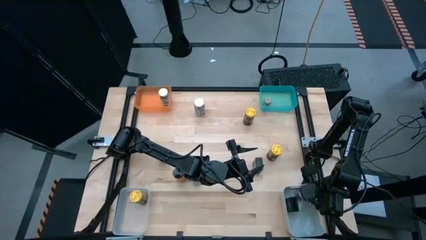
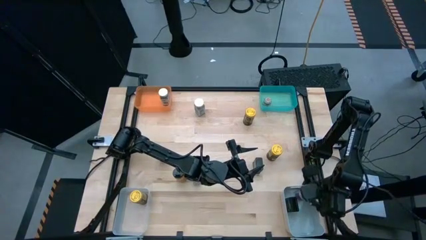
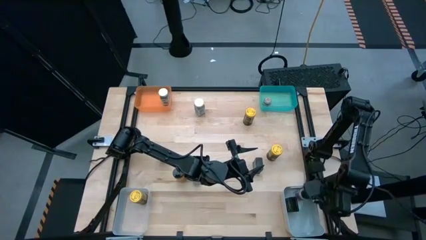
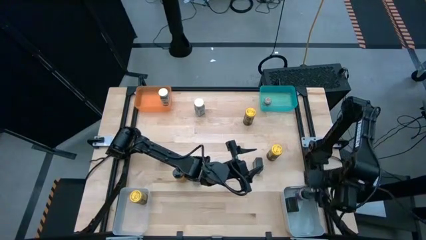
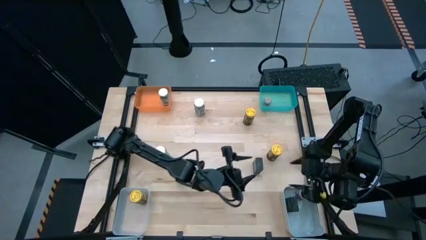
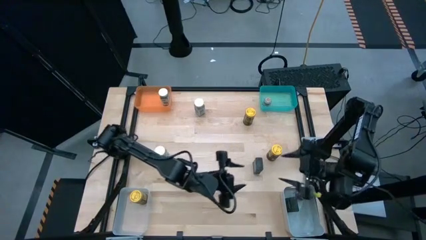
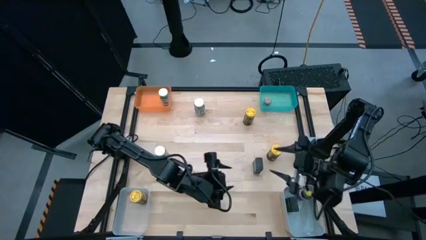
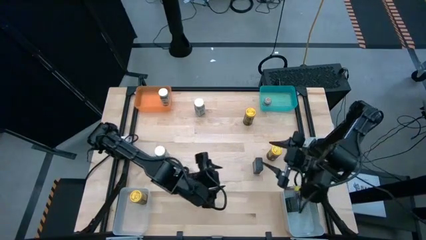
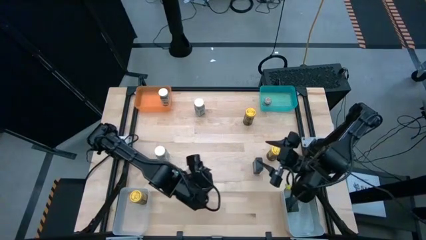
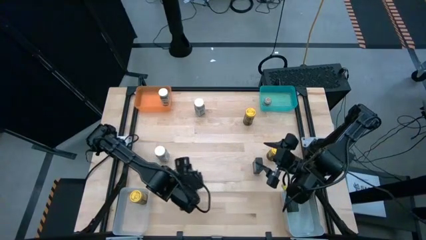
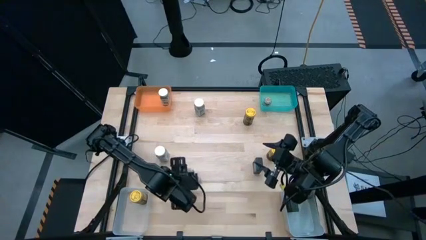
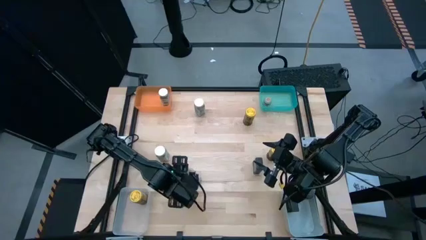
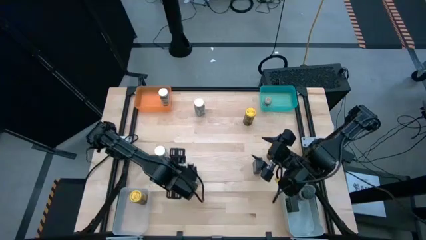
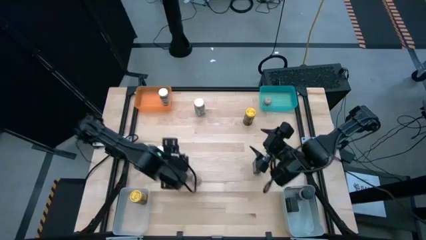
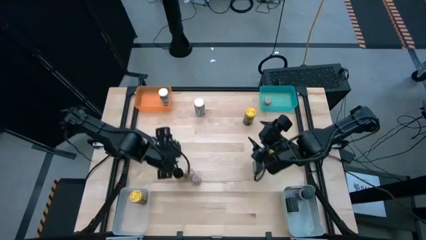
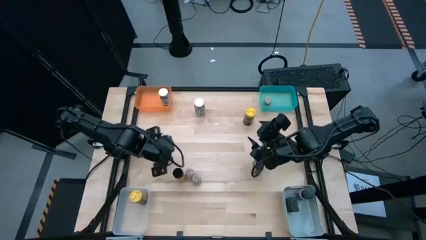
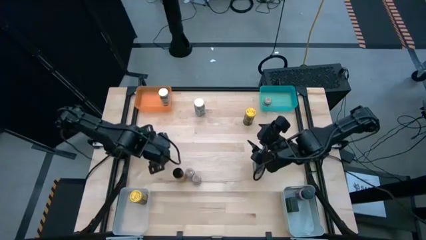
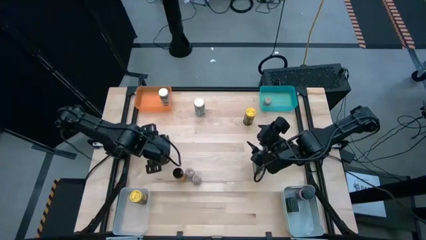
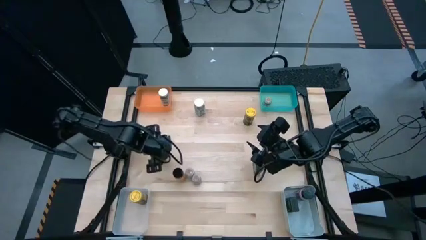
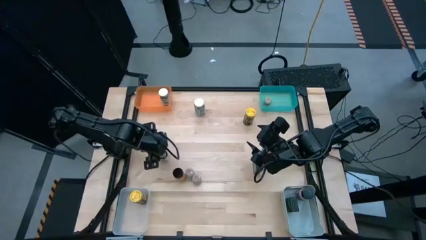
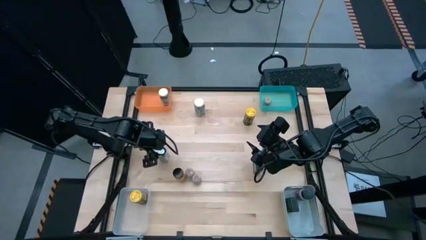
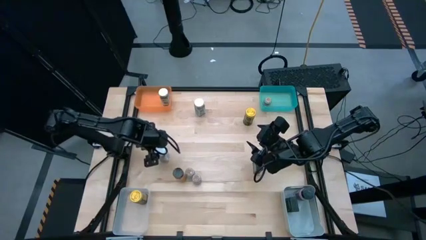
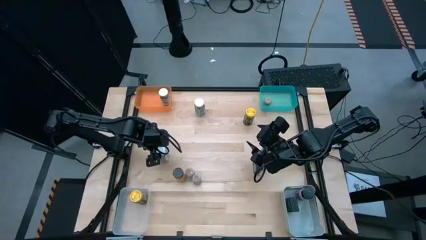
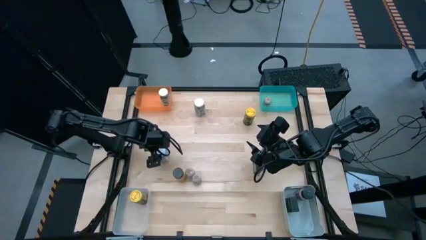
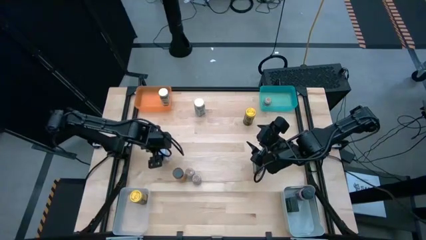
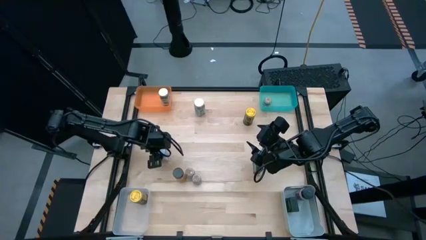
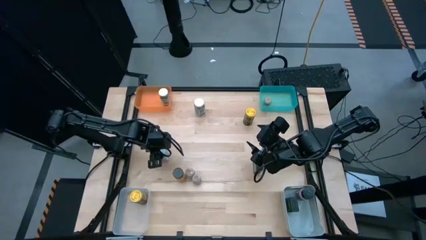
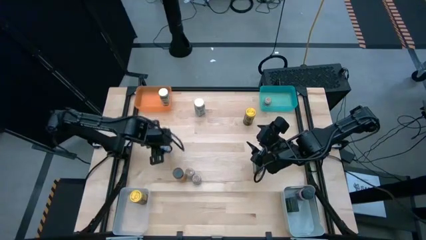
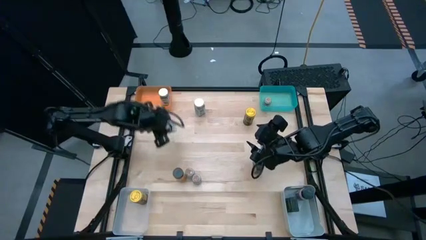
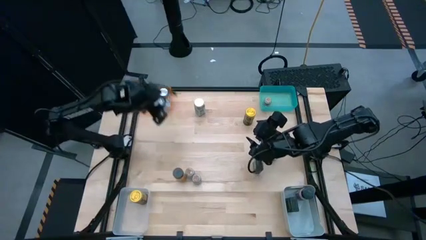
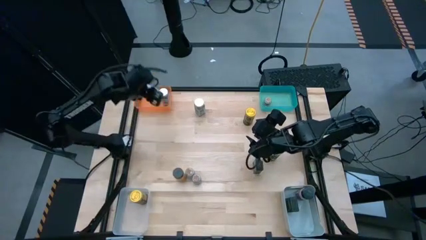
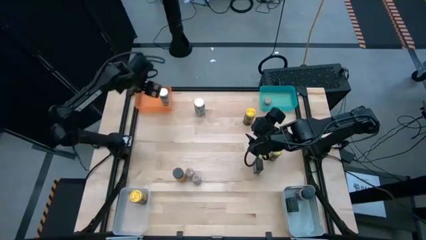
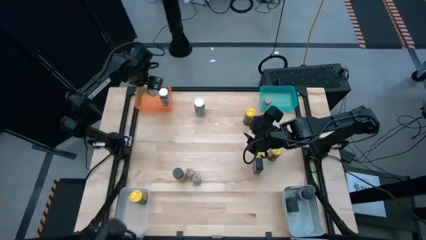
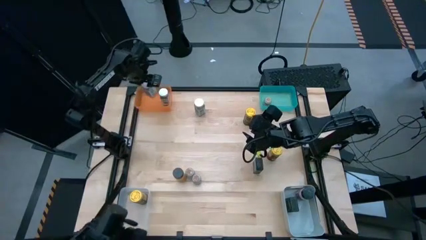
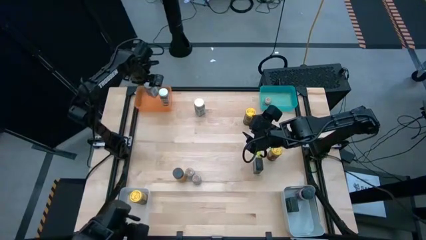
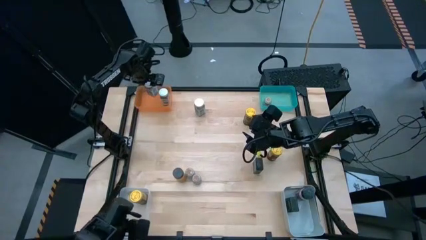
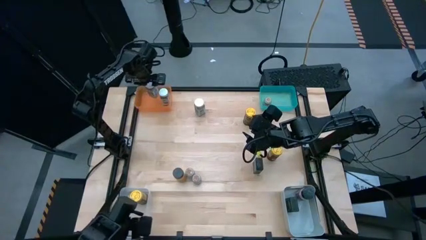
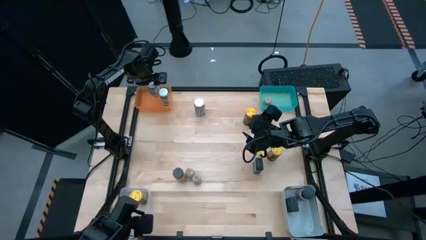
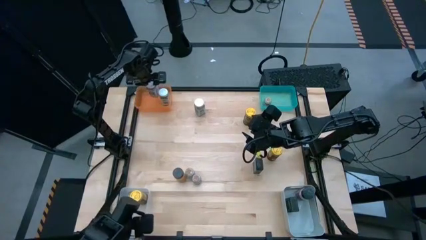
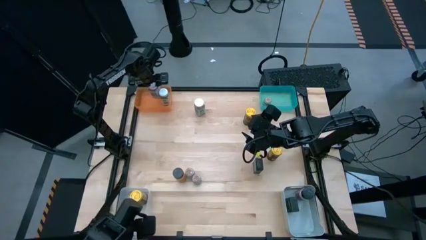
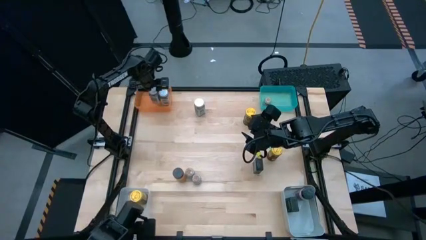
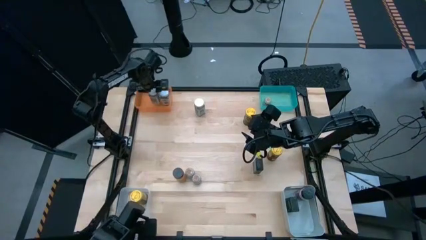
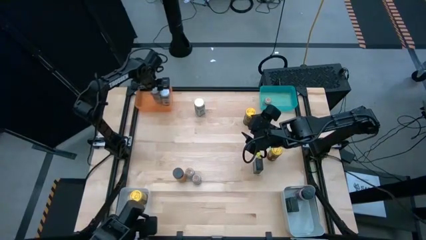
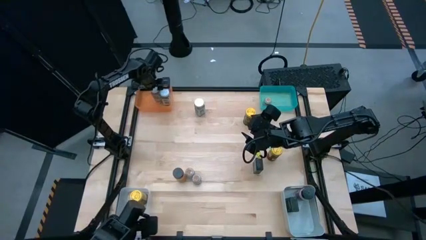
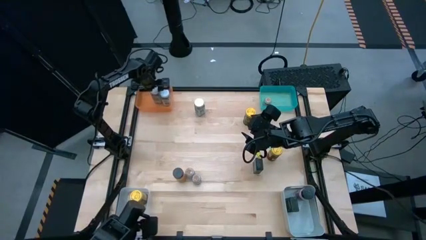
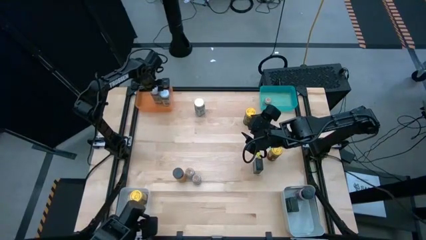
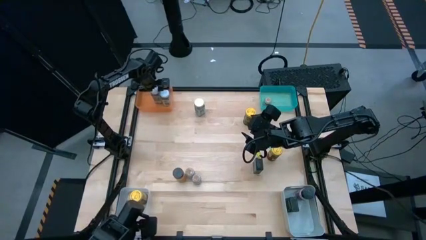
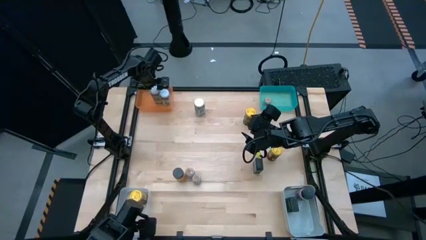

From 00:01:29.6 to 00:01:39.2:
Task: Sort spices by type
Put the bottom white seasoning bottle into the orange bin

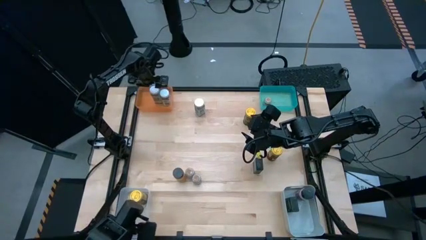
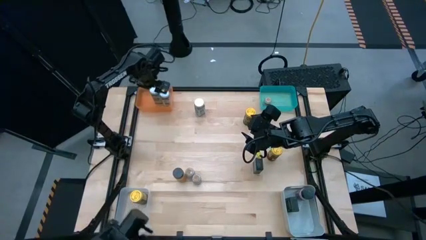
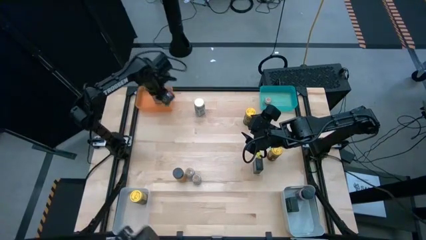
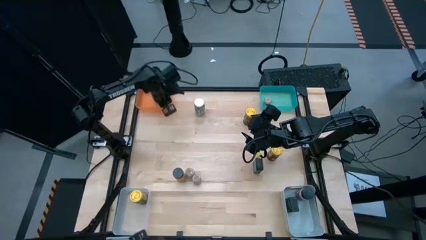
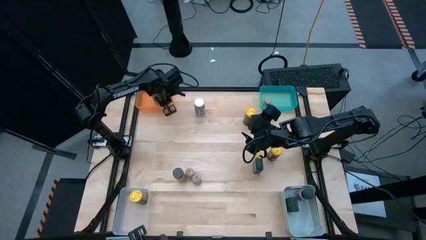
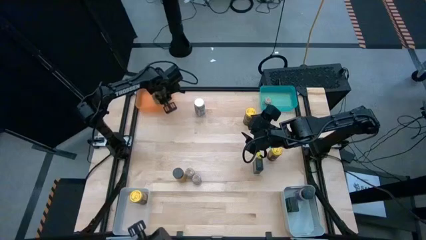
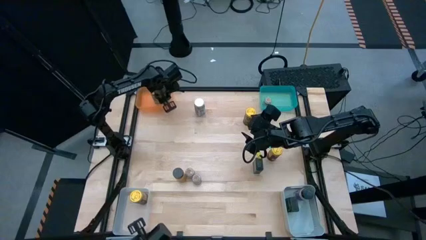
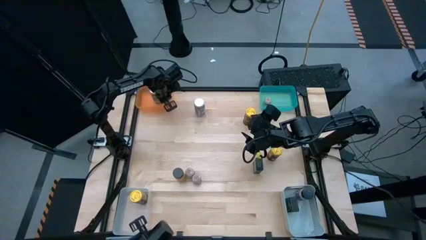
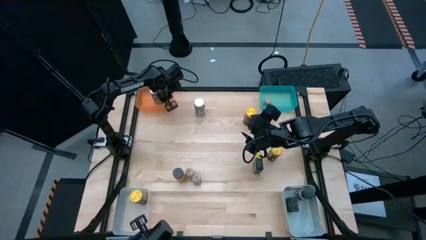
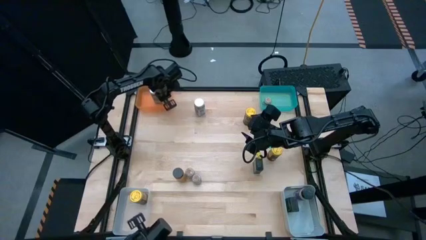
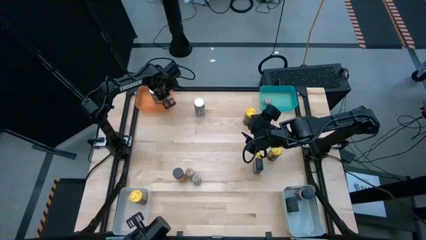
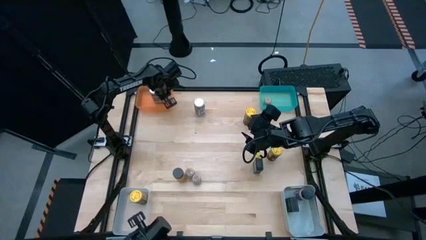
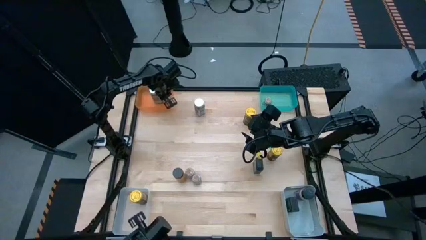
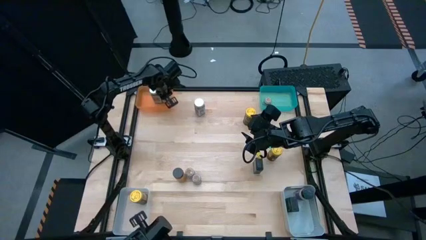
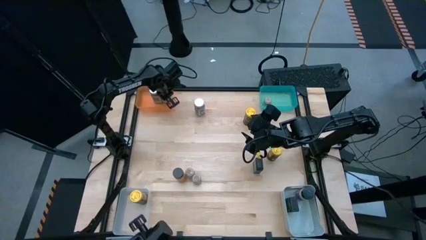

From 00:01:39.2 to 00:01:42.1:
Adjust the white seasoning bottle

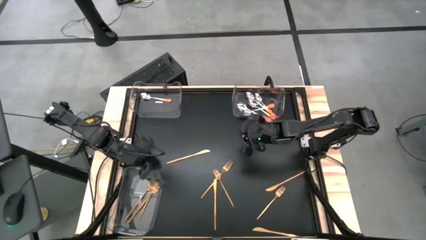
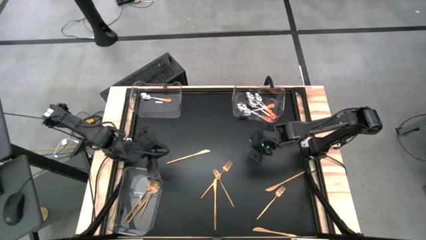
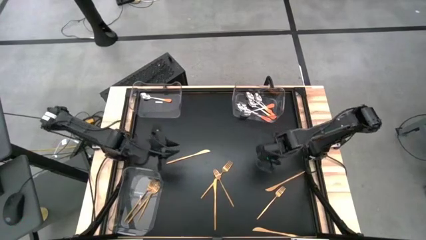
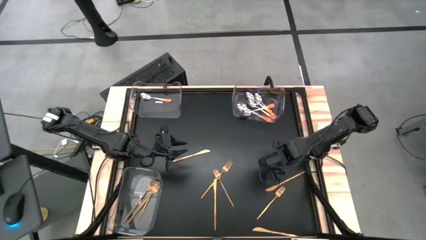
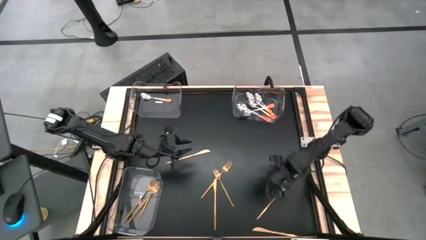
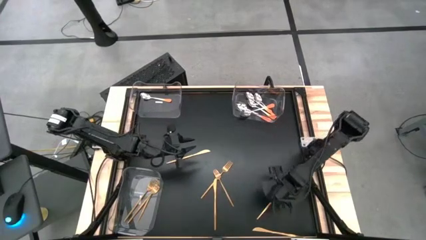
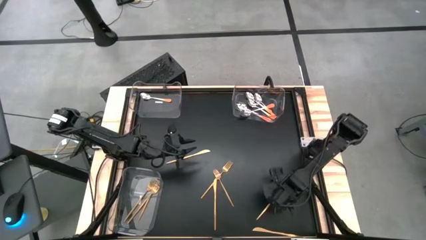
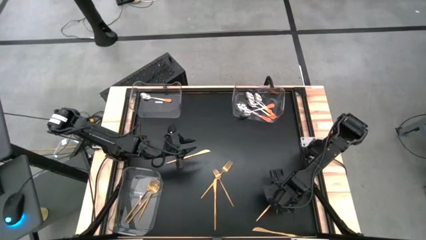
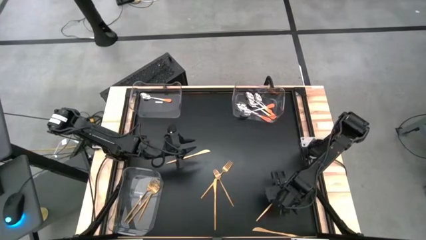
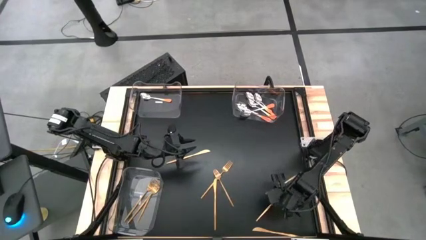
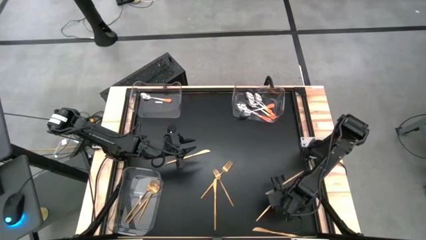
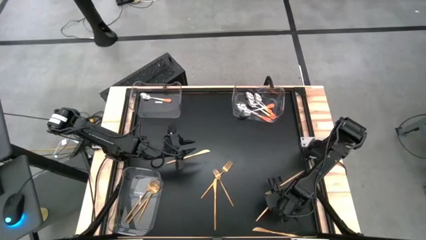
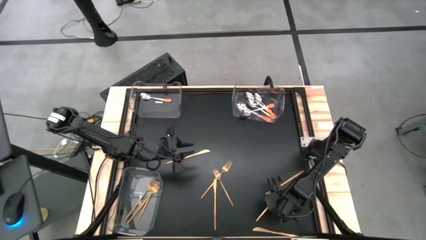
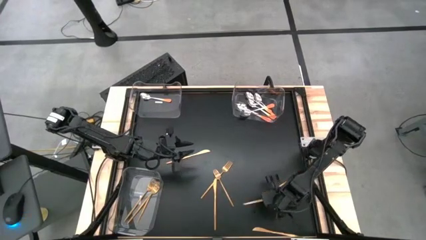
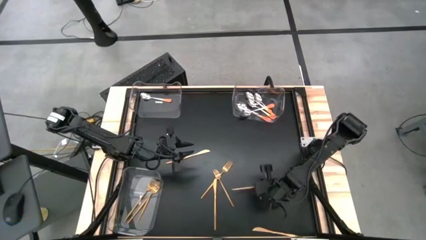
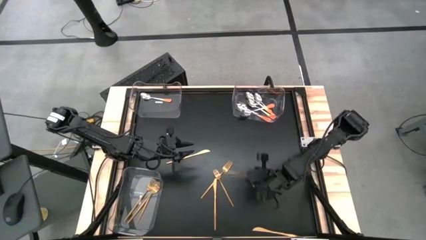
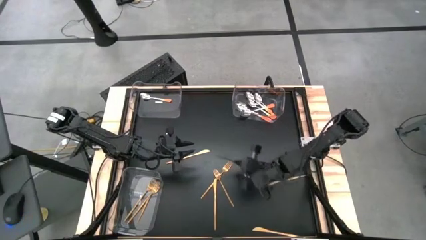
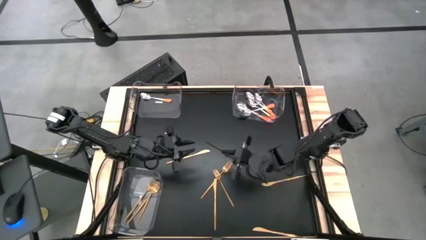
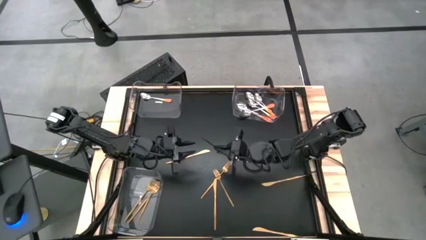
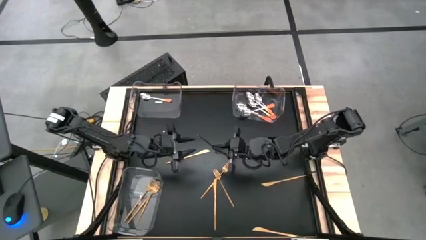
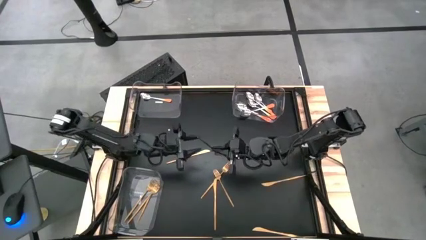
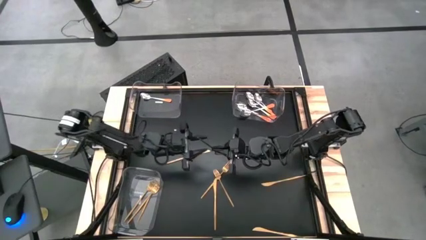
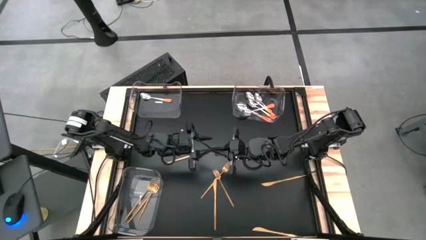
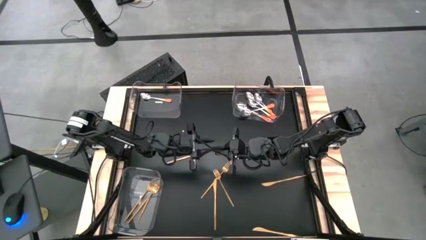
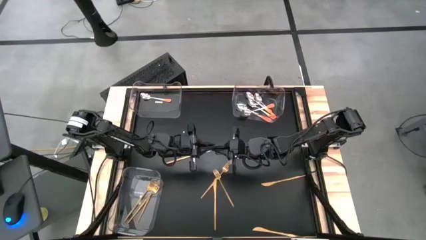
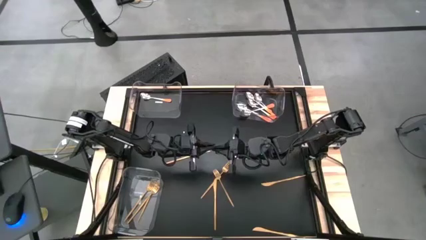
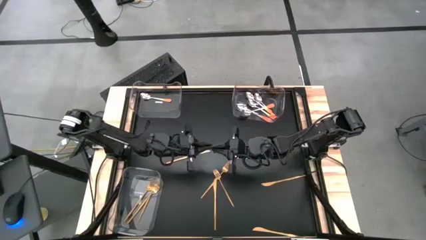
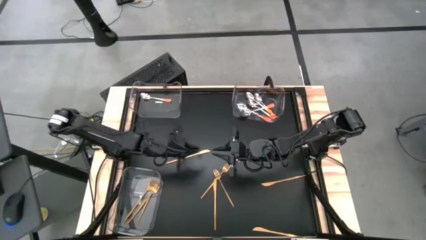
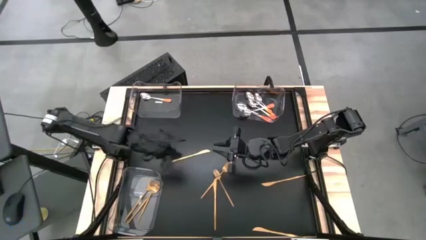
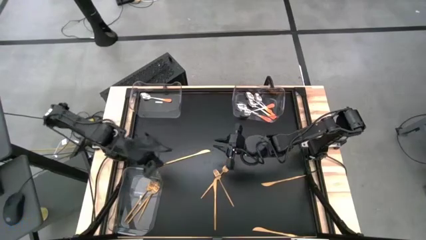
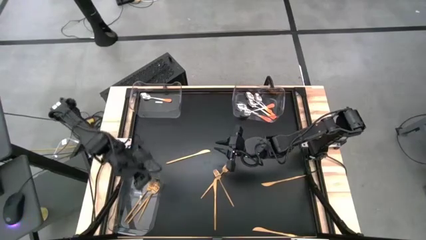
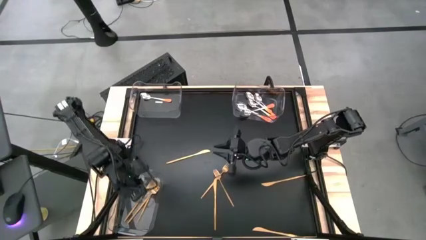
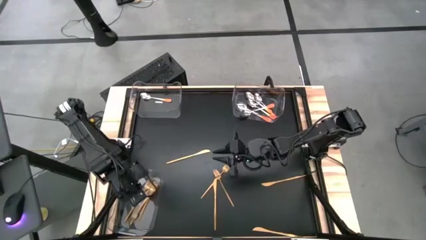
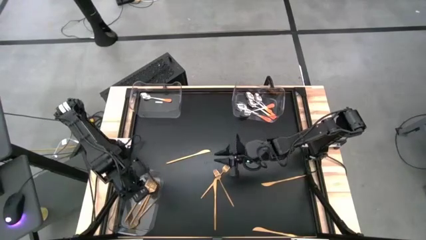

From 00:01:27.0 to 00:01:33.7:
Task: Sort silverware by color (type)
Put the gold fork into the bottom left transparent bin
